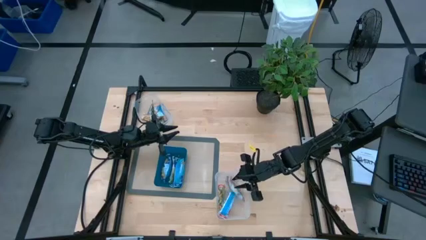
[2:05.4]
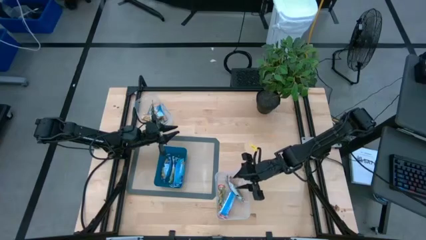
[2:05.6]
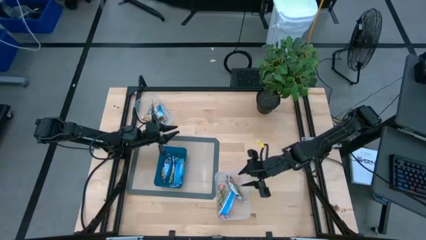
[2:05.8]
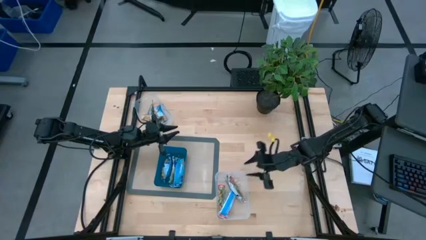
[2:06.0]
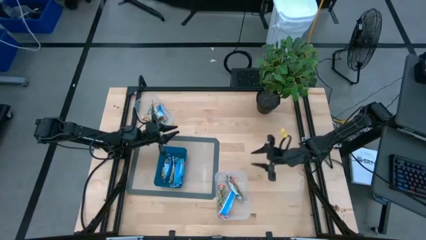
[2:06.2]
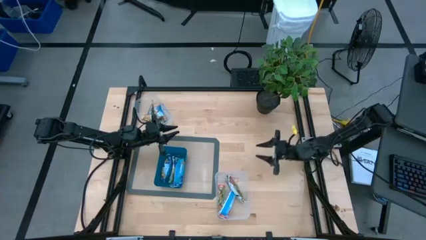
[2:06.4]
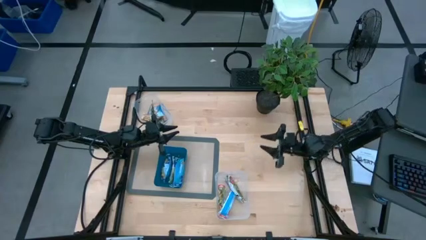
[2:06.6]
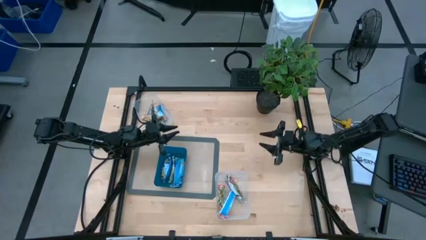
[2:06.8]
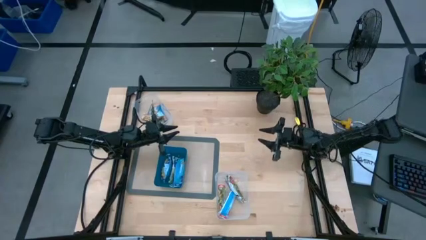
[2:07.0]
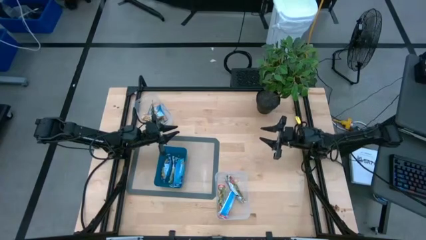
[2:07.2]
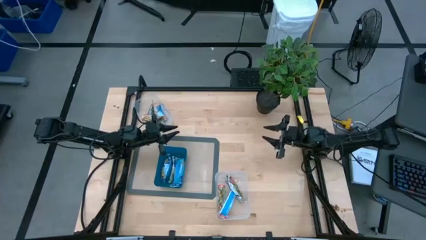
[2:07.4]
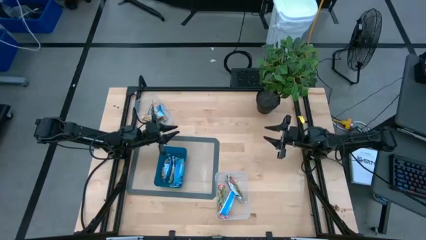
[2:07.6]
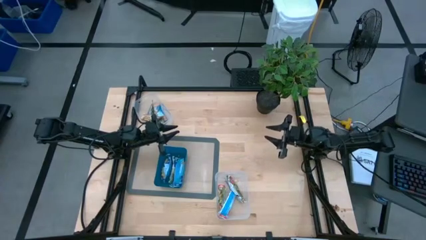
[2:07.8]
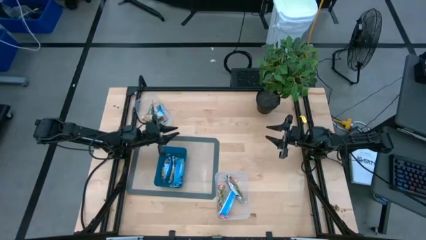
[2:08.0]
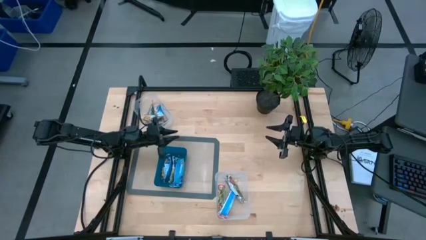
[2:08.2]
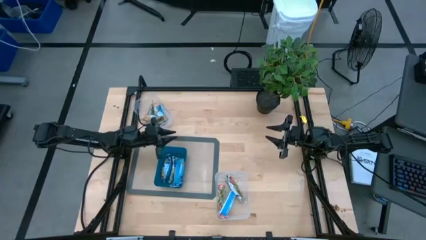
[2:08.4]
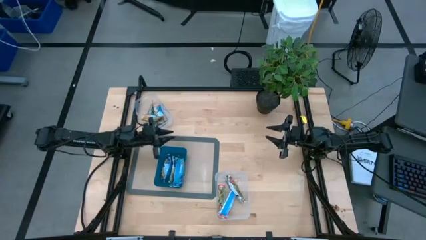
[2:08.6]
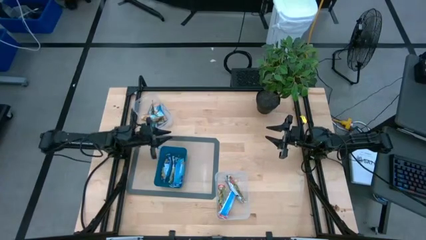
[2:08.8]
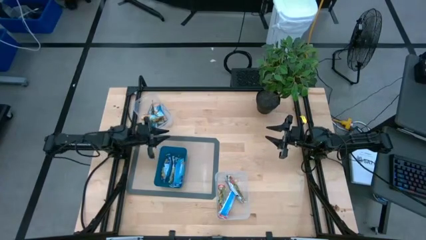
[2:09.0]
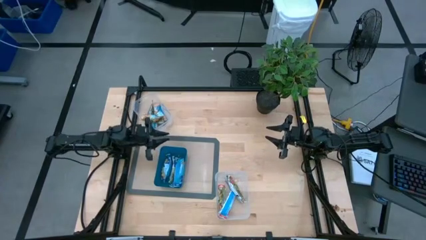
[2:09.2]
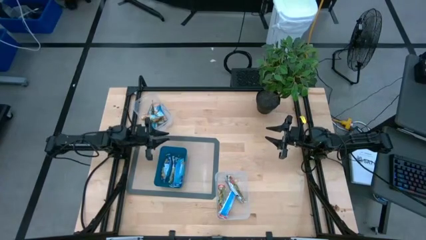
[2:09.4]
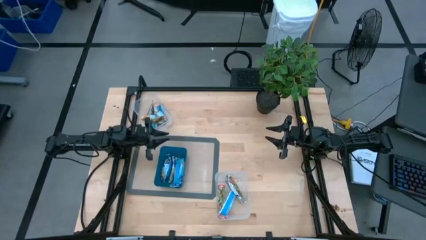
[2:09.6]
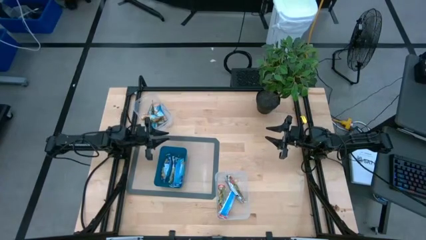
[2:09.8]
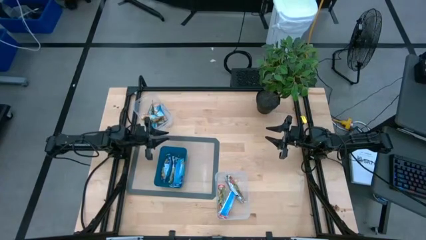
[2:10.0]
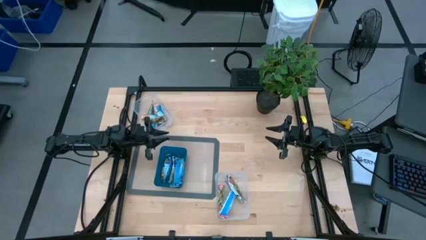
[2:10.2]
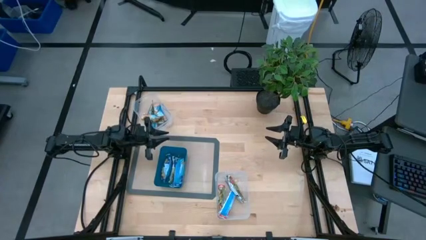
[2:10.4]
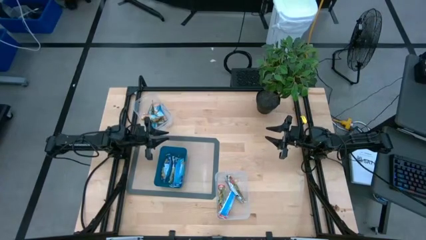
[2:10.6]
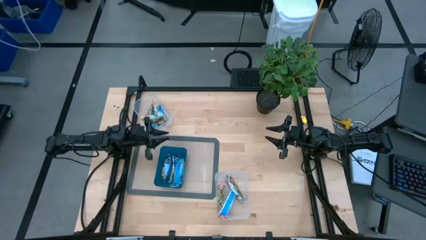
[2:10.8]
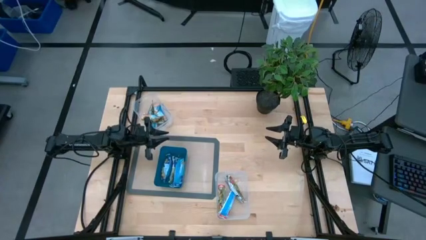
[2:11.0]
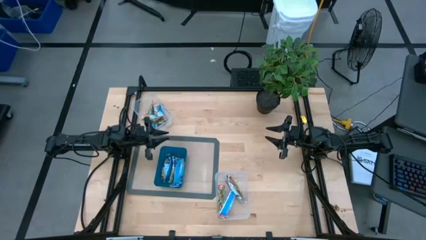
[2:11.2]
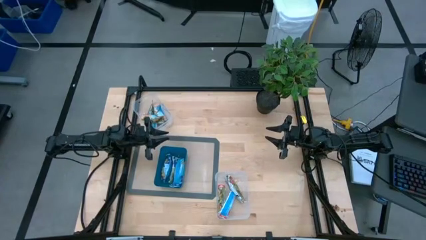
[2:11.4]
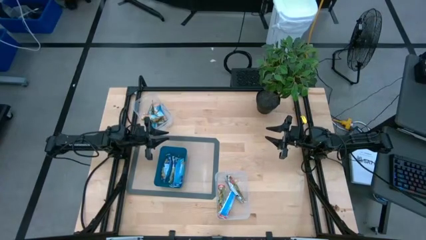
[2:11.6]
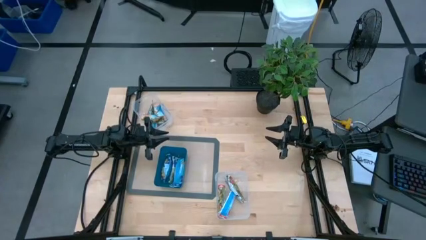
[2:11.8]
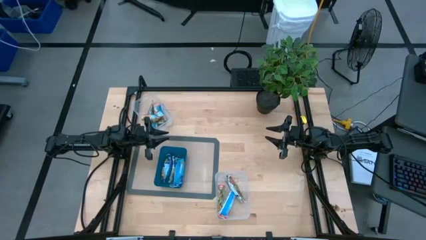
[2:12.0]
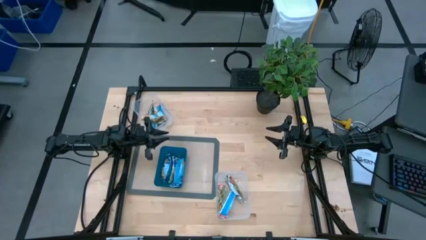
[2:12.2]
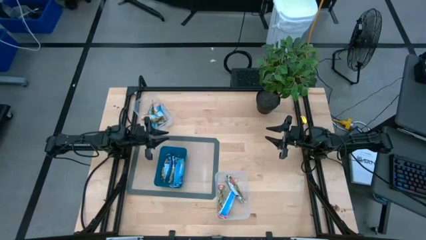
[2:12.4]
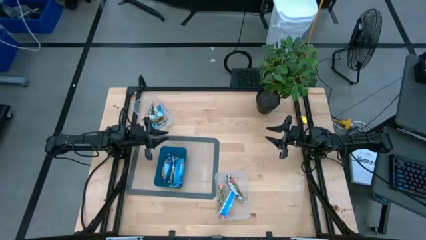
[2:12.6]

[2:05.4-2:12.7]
Task: Pick and place Granola Bars by type
Return to Home Position

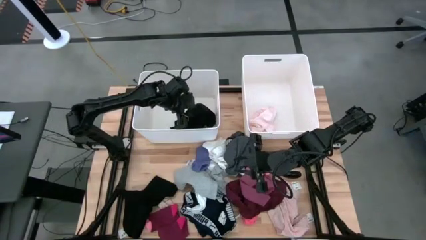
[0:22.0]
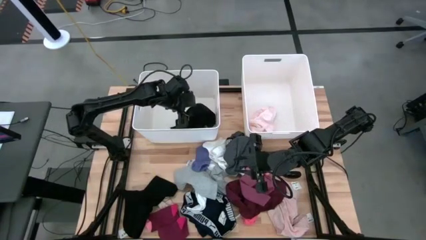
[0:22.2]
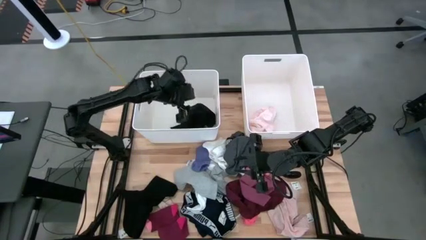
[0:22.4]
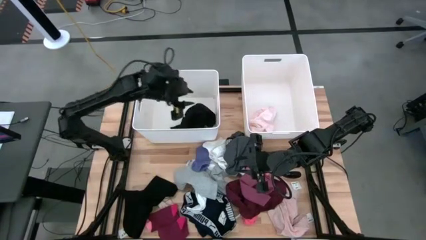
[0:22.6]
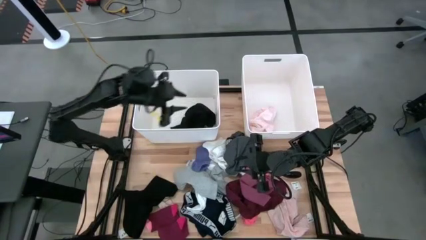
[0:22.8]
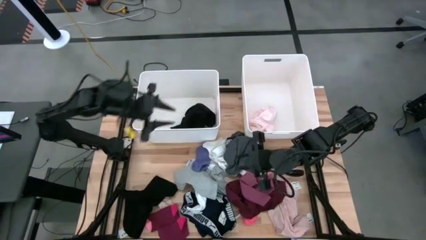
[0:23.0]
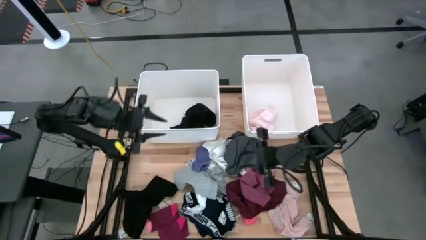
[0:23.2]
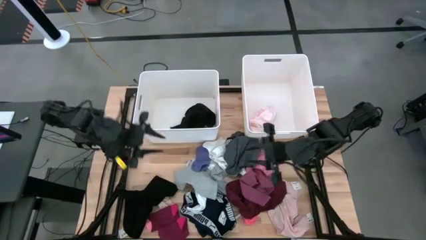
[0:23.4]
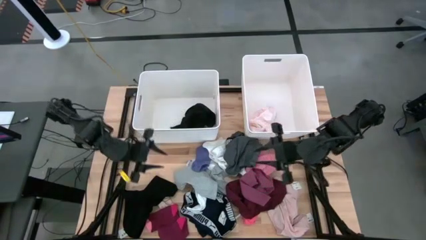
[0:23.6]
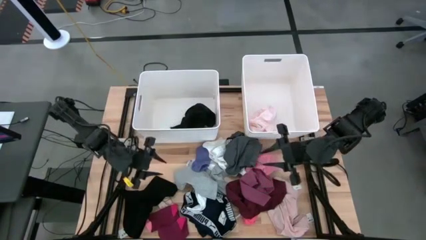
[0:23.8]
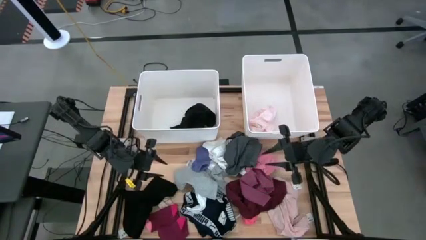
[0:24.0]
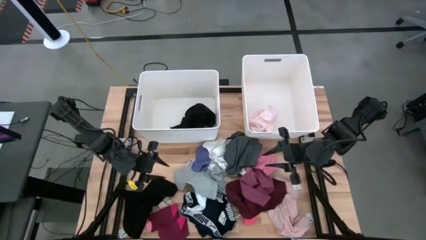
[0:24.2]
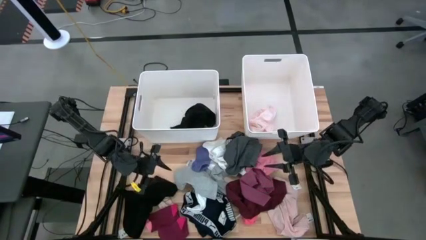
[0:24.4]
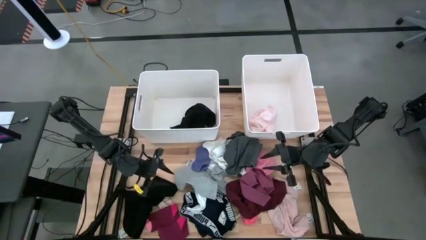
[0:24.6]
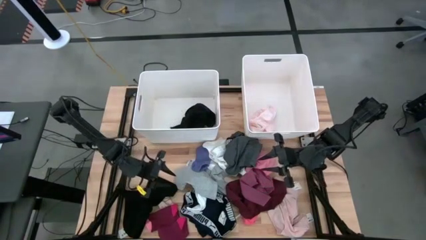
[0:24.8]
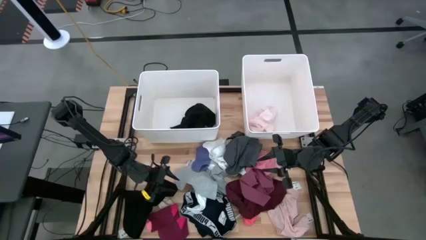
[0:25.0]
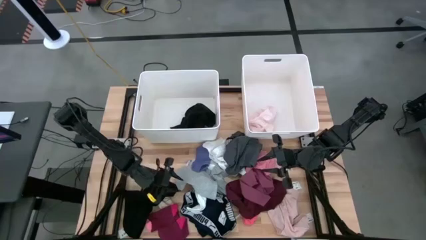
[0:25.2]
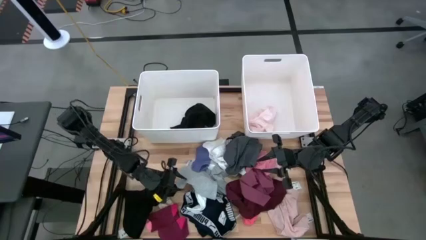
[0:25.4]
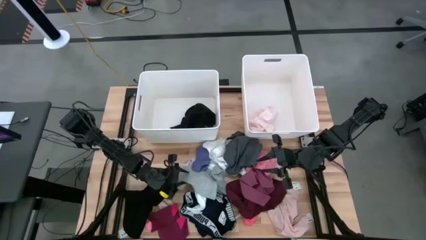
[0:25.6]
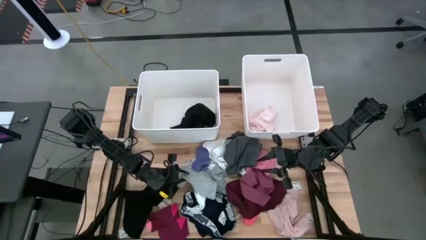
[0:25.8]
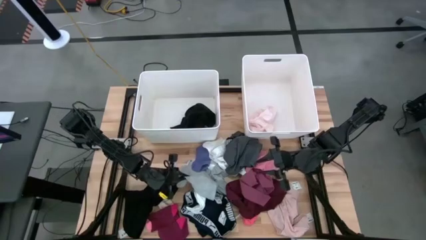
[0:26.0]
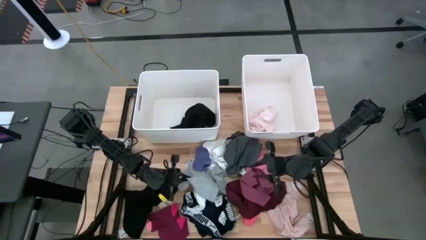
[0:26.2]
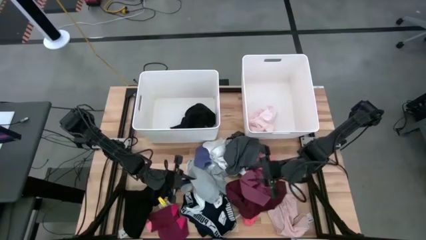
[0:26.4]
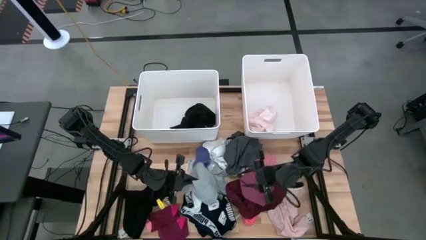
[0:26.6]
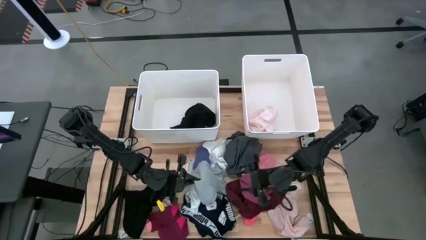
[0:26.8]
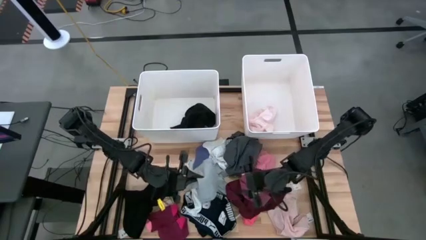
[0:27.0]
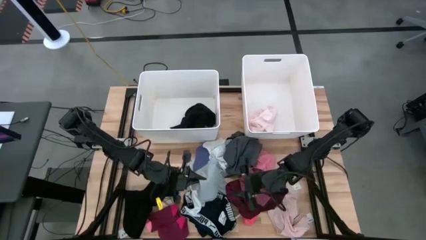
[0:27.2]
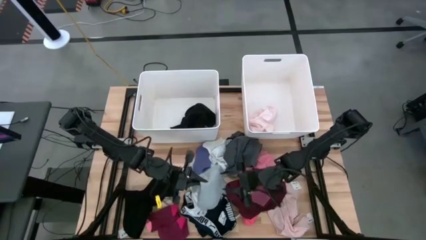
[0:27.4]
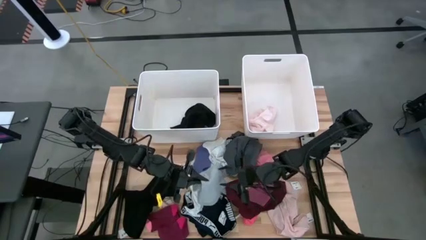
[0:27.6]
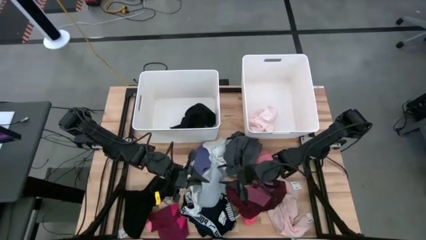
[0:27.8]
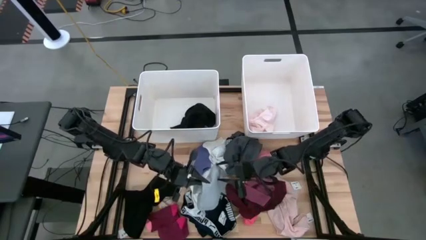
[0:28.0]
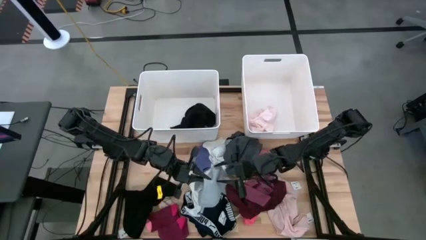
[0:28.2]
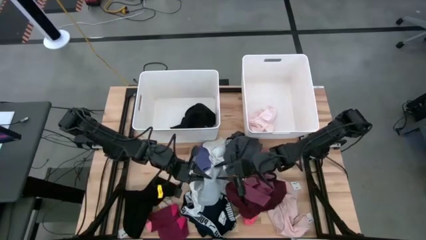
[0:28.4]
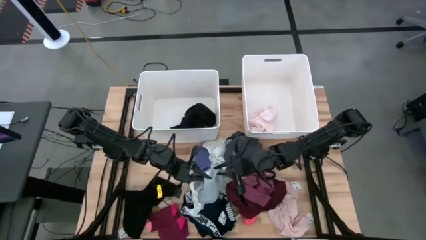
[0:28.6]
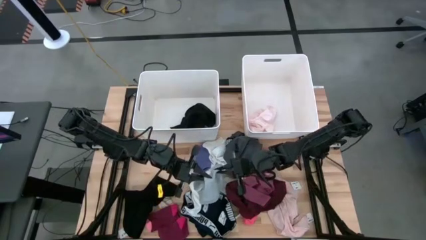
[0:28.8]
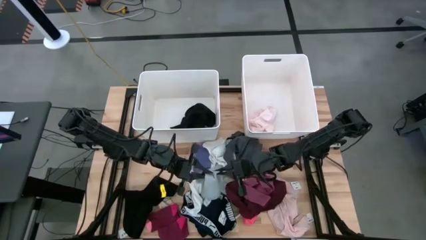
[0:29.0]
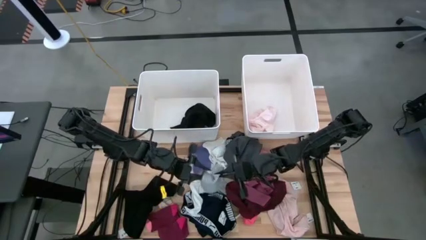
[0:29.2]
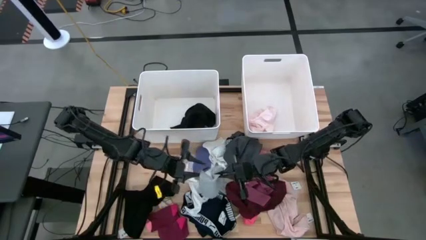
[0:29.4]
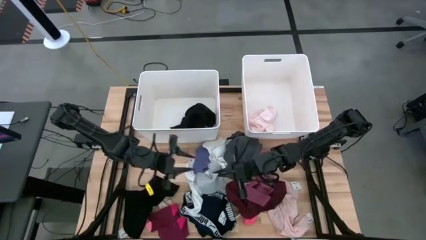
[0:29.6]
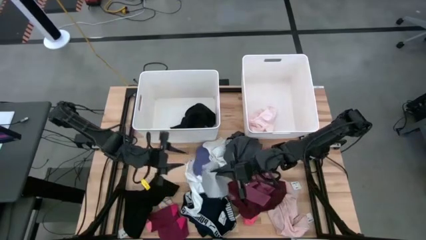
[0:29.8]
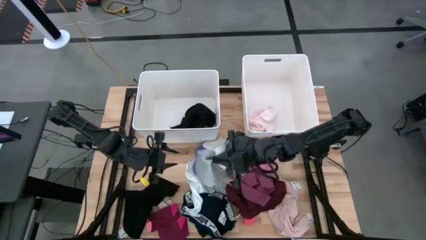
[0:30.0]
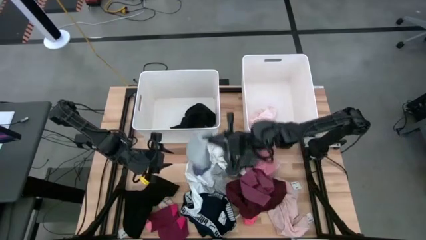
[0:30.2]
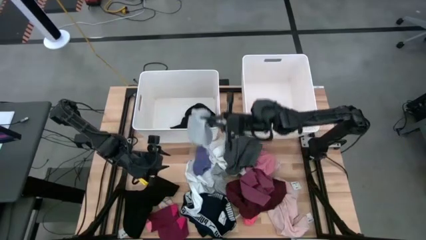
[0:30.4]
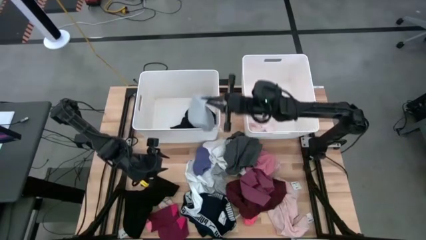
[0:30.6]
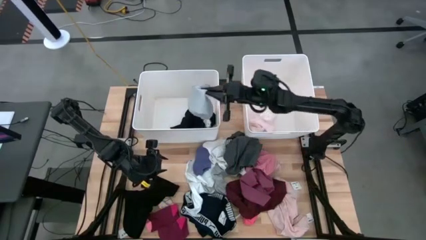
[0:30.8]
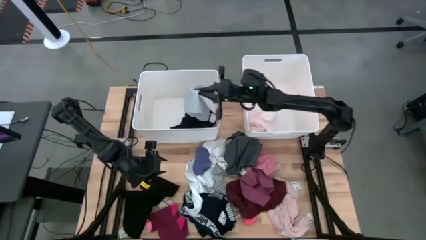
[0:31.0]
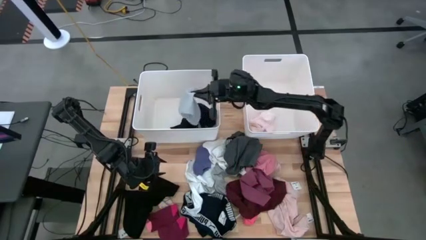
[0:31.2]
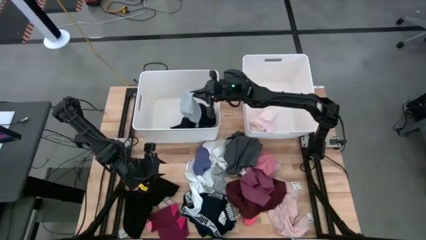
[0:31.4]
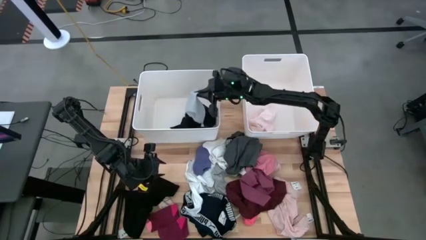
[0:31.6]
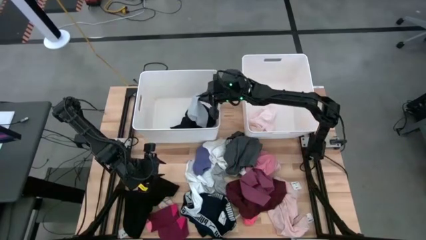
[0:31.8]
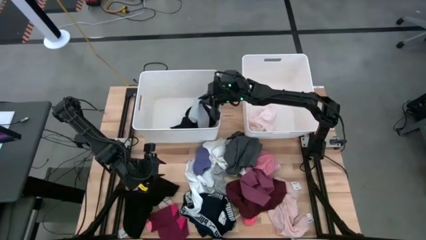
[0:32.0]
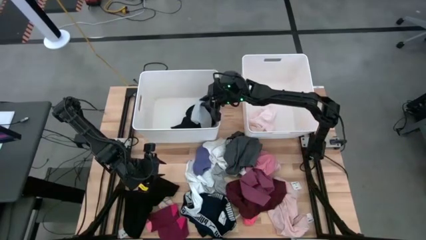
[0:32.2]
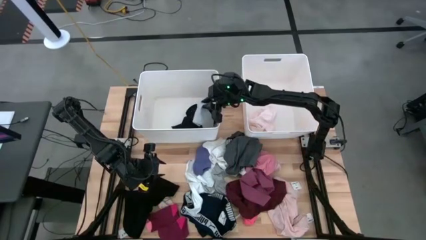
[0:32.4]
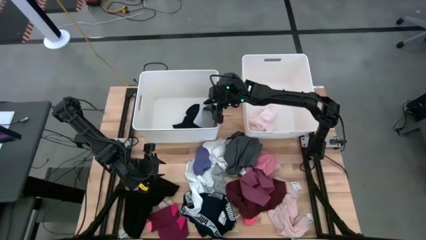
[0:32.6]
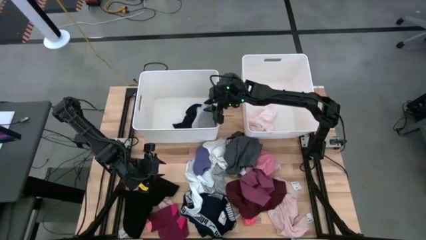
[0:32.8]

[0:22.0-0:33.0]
Task: Sort clothes
Put the gray garment into the left white laundry organizer
